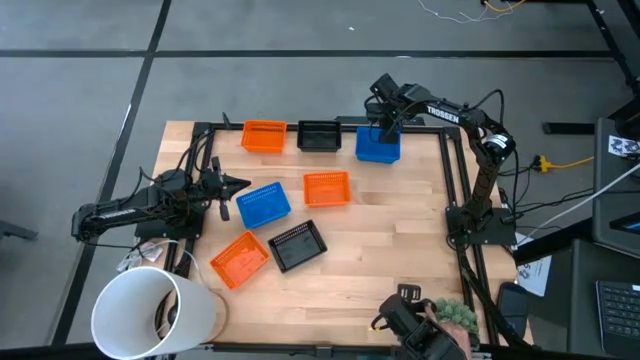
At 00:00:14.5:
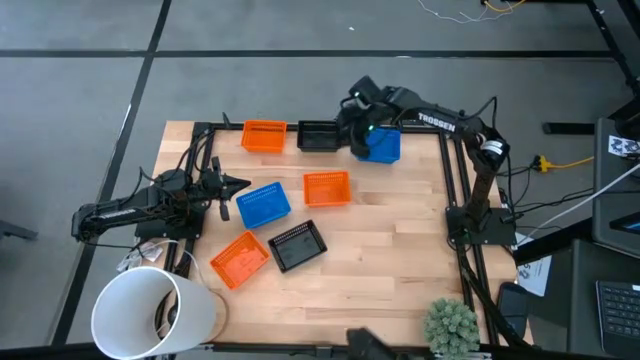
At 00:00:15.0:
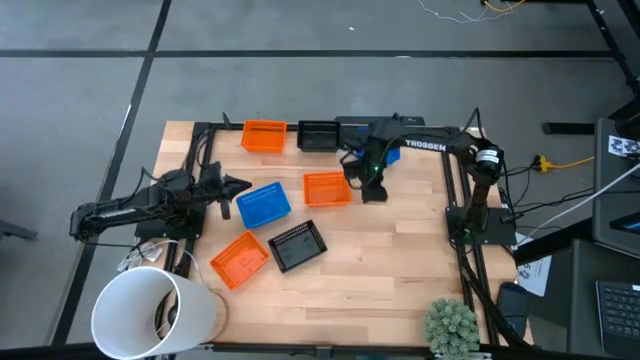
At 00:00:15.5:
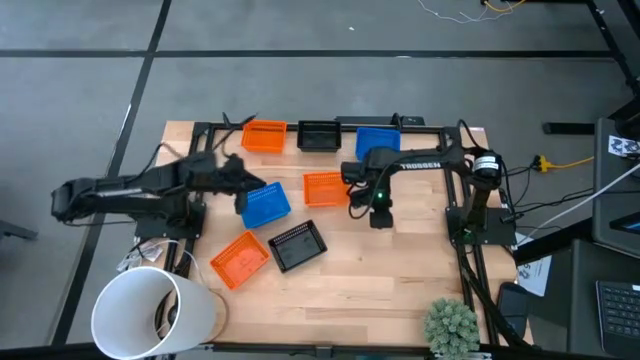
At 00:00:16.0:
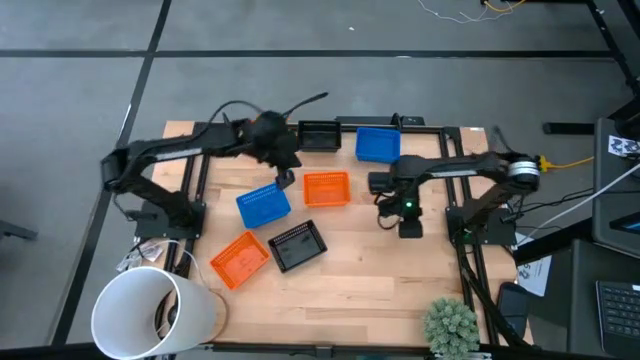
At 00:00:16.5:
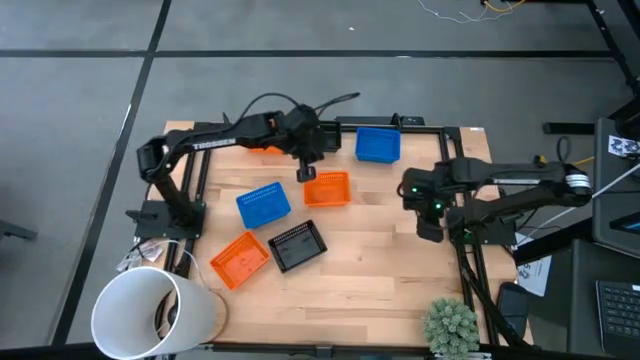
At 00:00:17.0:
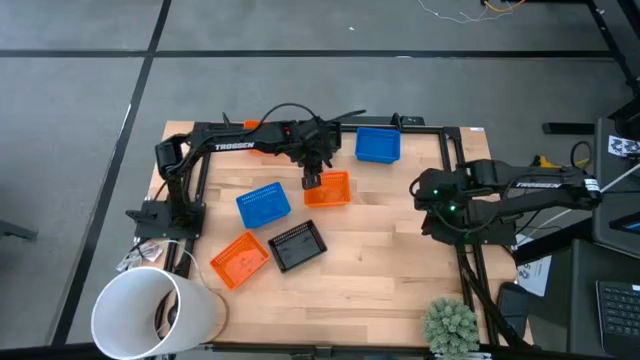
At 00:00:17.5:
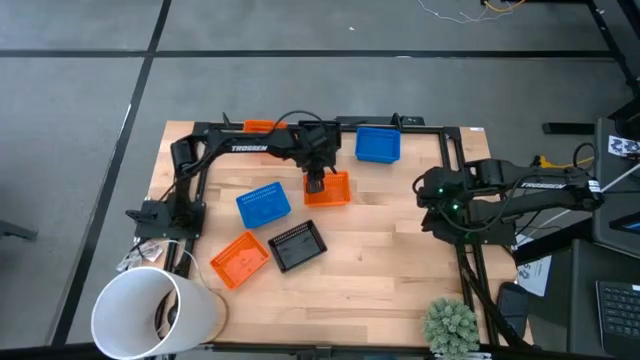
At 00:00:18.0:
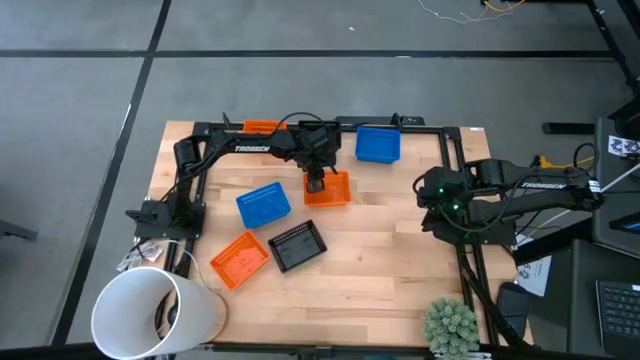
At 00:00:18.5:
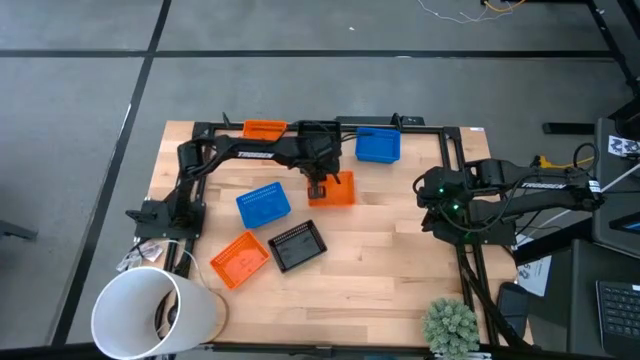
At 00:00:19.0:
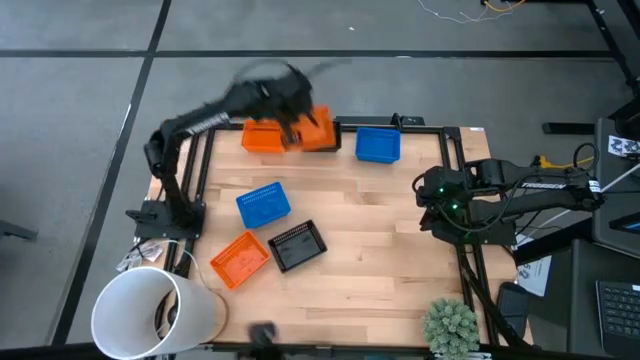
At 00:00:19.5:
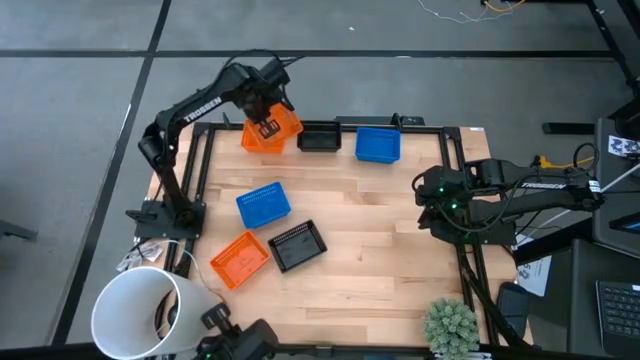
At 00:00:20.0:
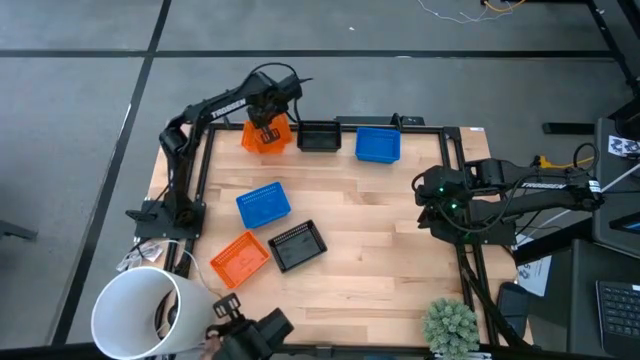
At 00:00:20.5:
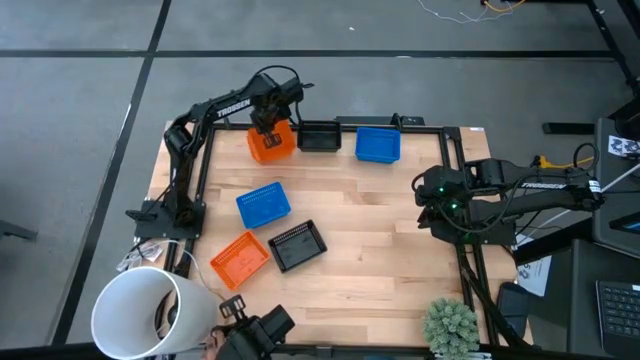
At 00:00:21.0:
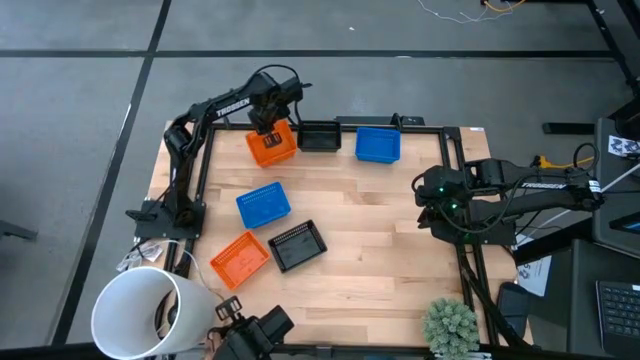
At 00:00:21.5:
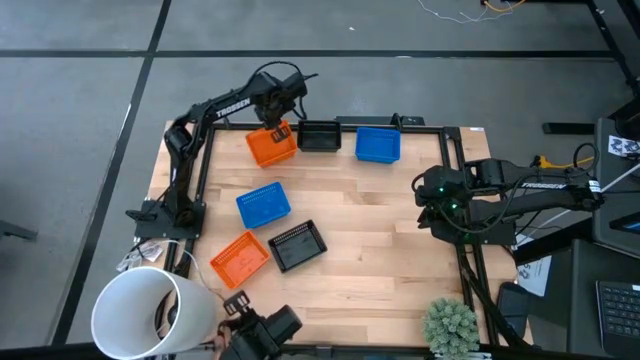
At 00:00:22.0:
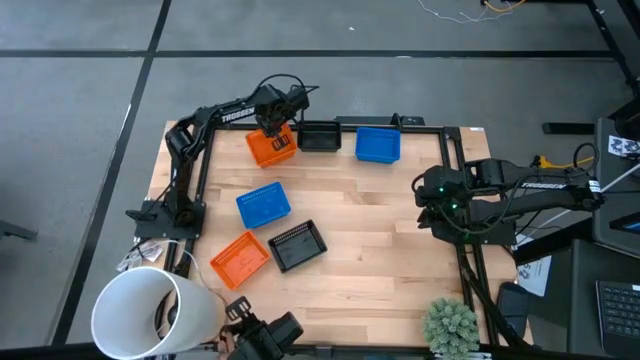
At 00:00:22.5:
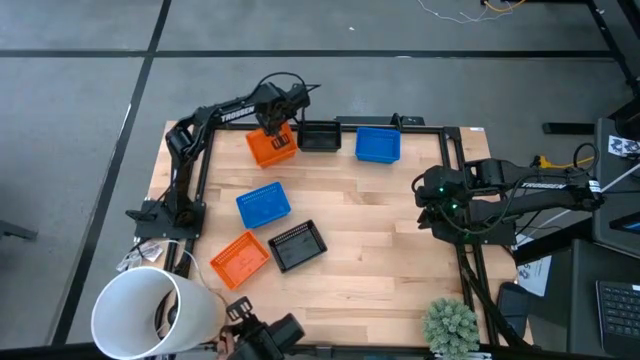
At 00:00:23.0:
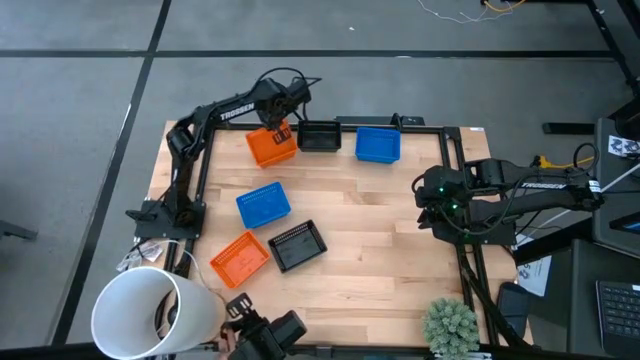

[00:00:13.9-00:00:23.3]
Stack the right orange basket on top of the other orange basket

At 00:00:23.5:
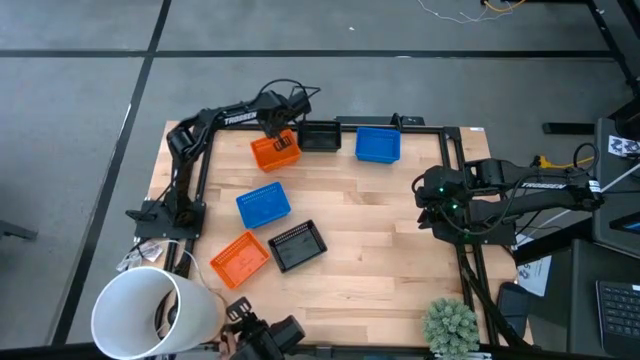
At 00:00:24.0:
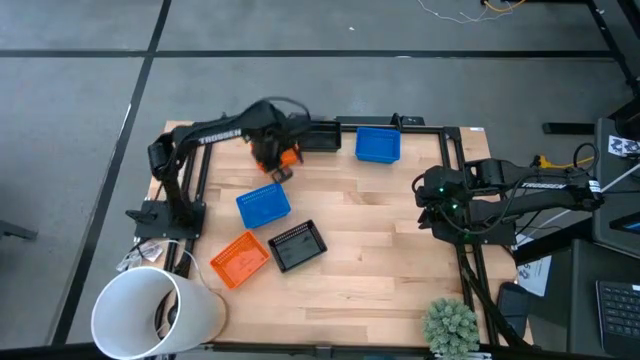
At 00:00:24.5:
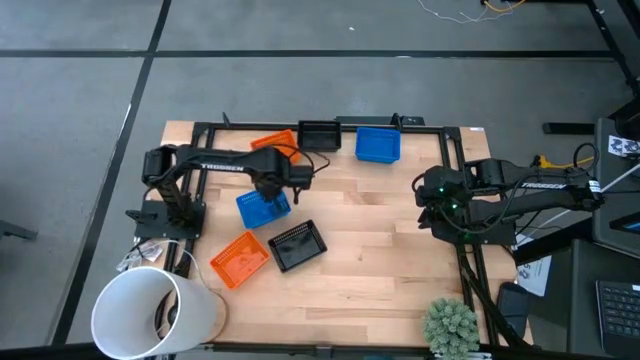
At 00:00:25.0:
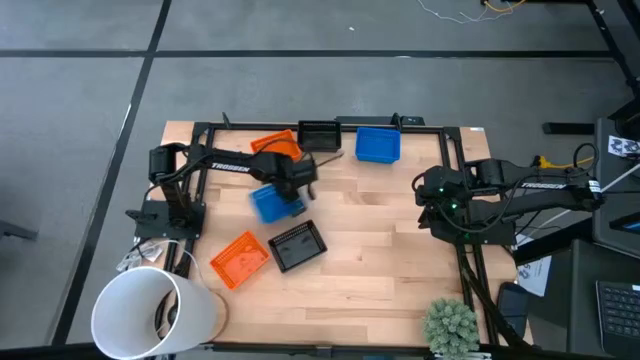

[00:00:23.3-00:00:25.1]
Move the blue basket

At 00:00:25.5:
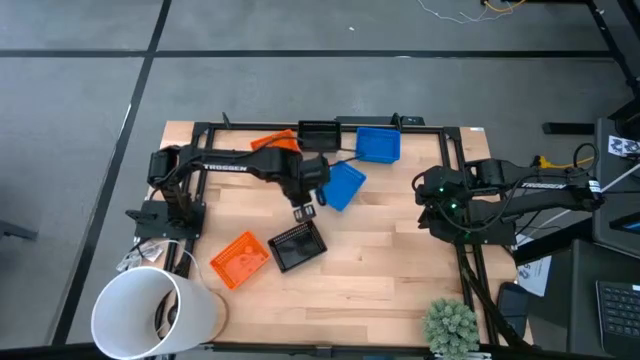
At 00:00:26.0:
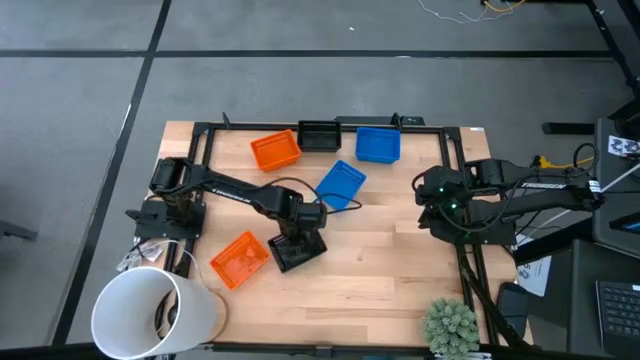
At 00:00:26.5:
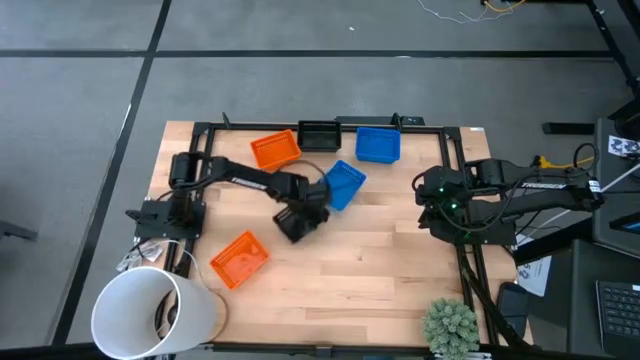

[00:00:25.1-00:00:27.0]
Move the black basket

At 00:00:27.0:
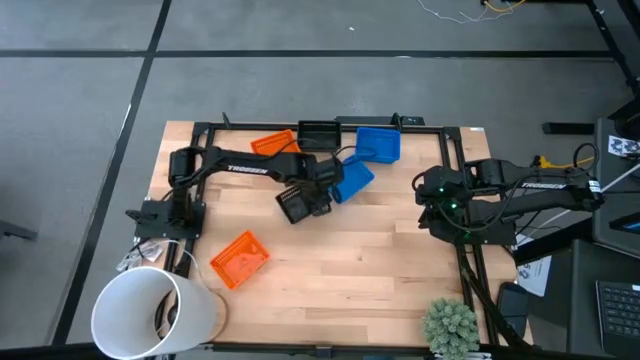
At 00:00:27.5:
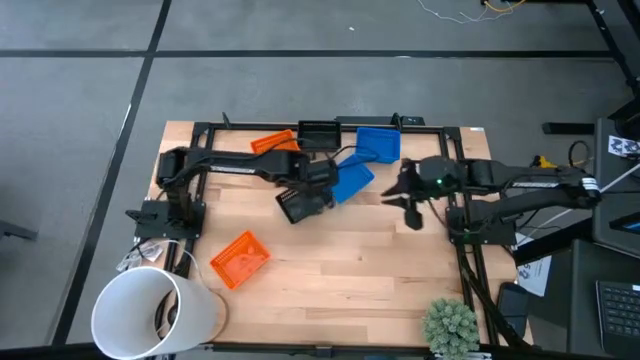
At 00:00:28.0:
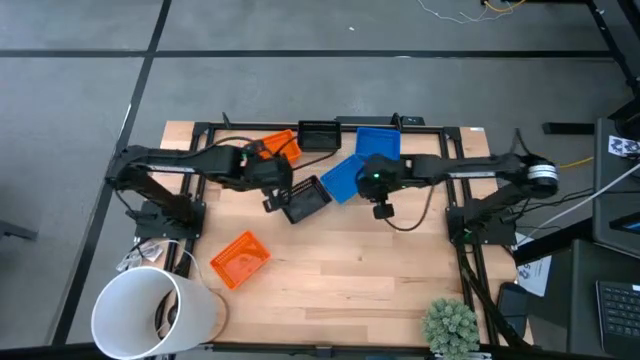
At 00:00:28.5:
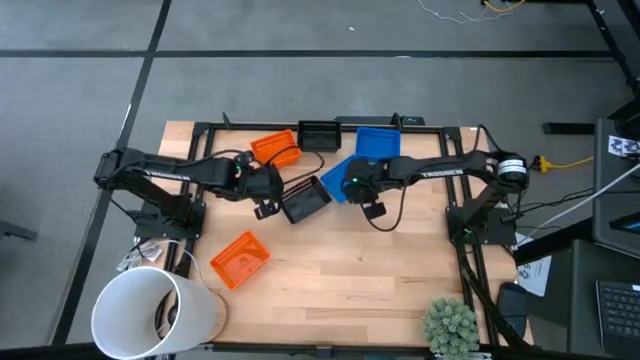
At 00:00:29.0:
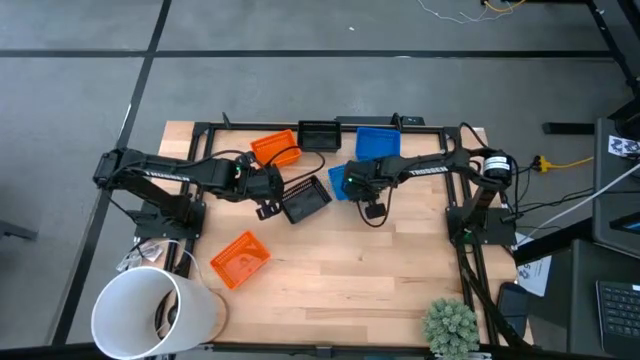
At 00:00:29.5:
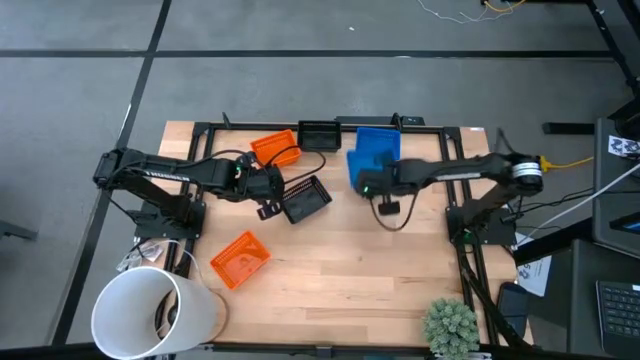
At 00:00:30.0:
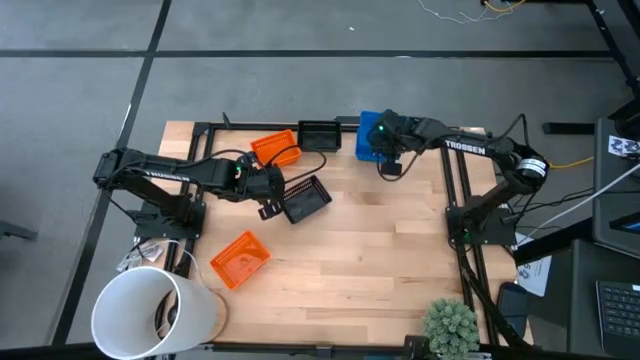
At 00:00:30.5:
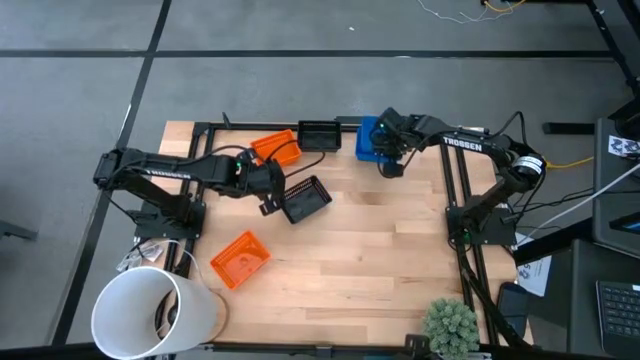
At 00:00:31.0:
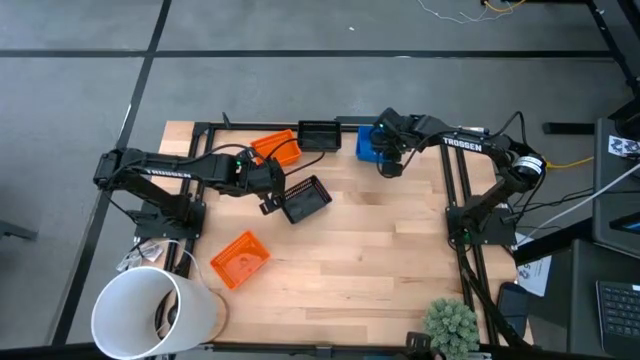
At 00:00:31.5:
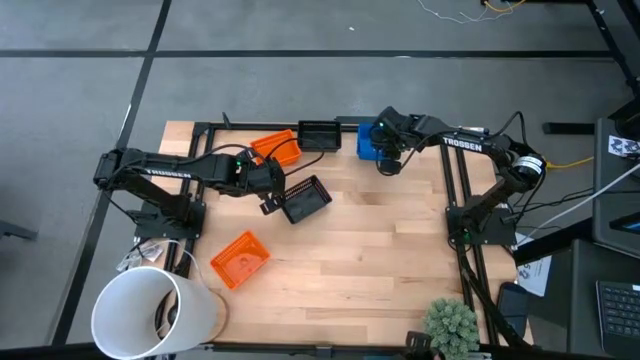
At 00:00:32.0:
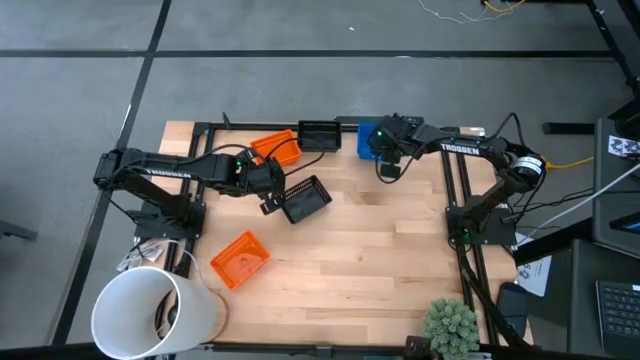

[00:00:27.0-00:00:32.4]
Stack the blue basket on top of the other blue baskets
